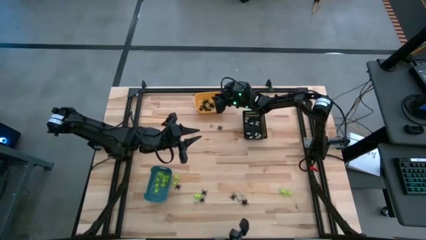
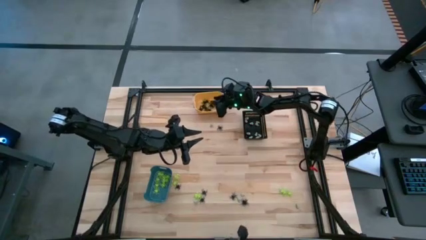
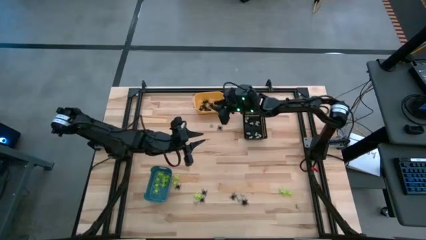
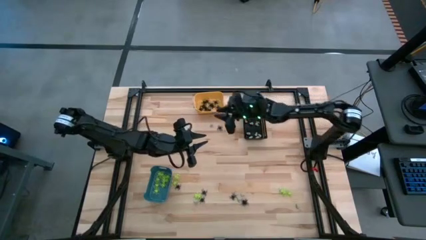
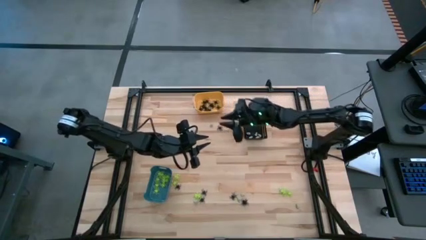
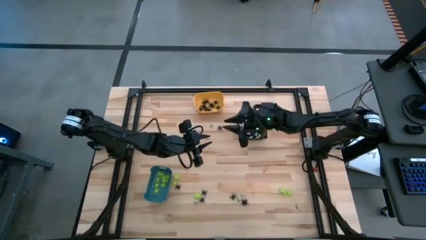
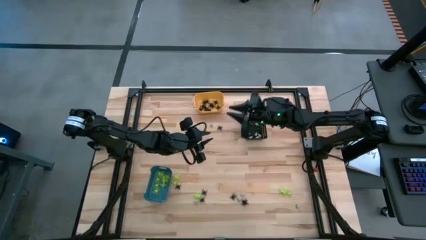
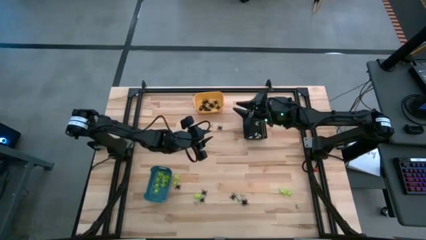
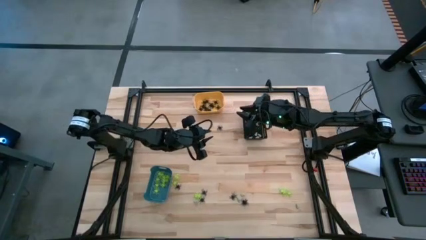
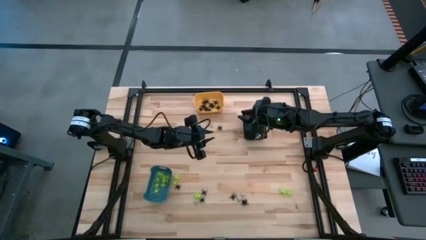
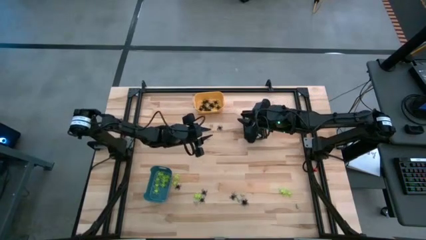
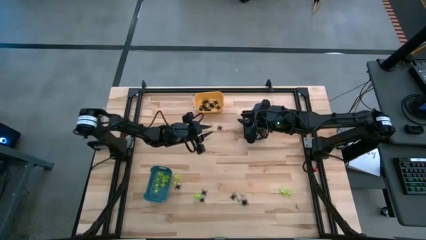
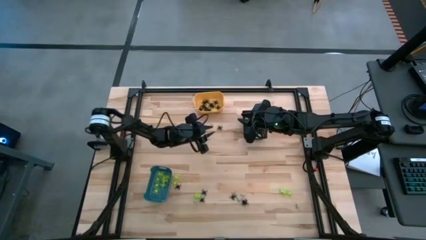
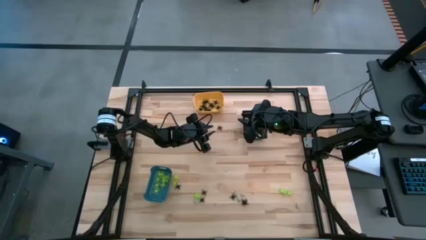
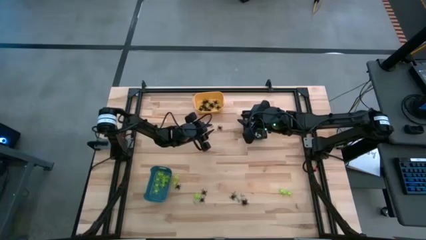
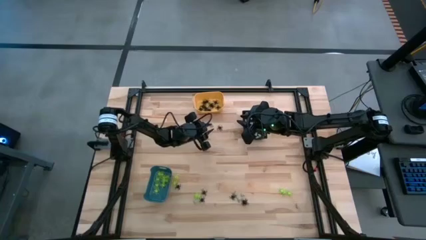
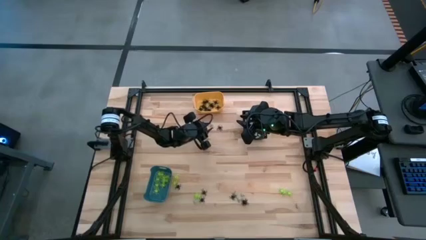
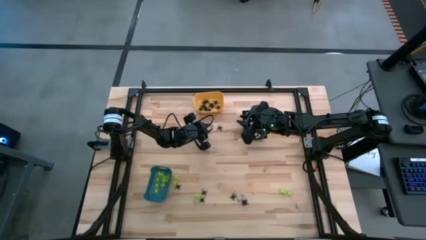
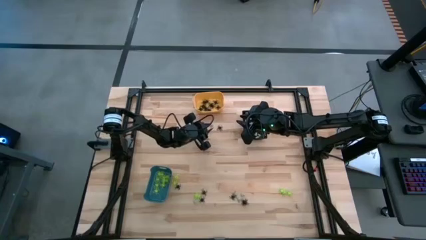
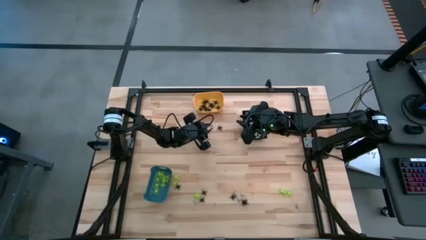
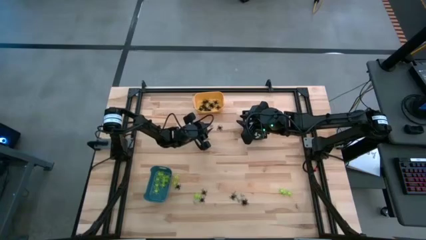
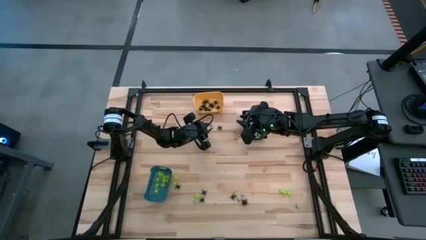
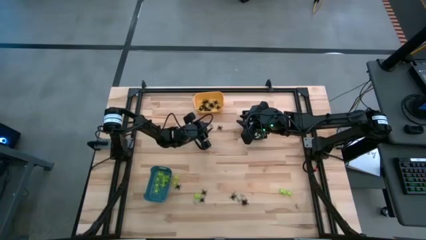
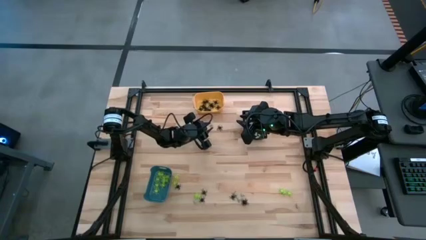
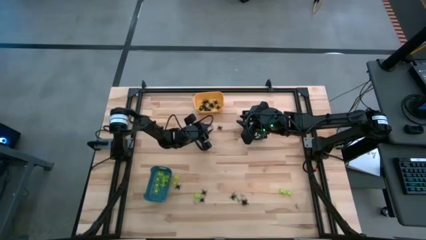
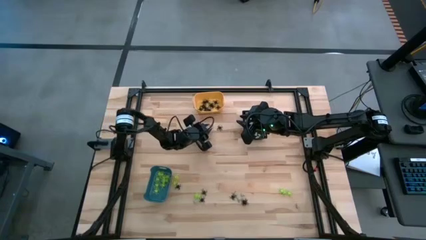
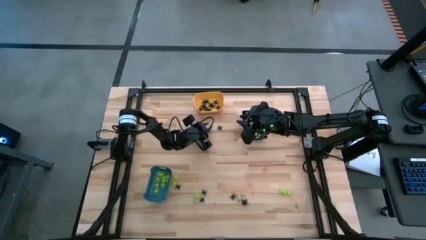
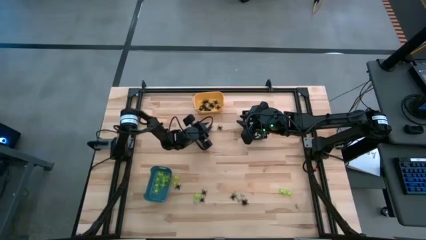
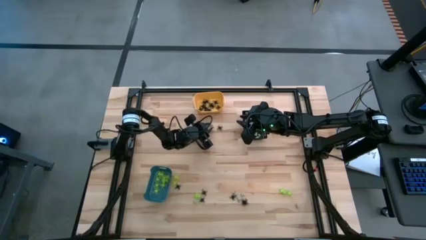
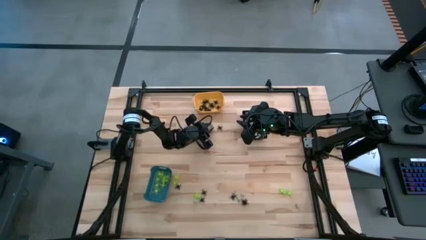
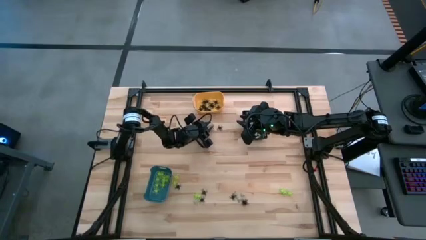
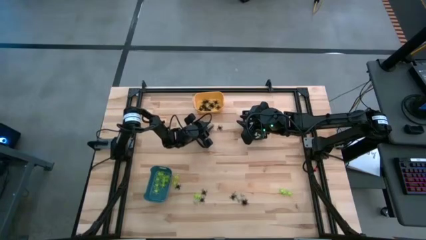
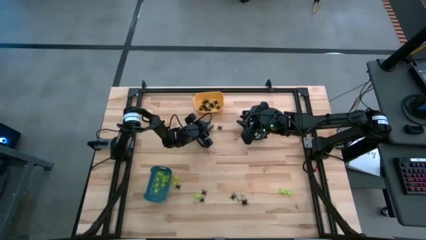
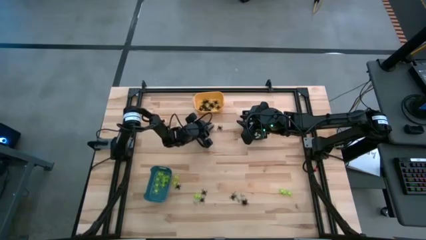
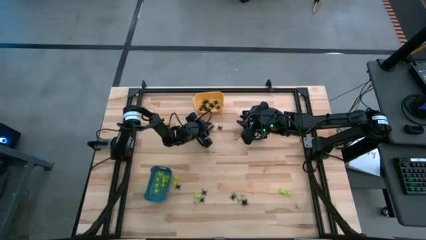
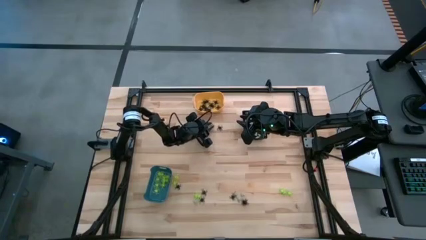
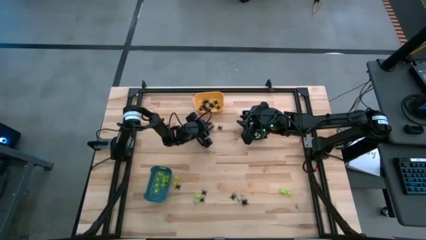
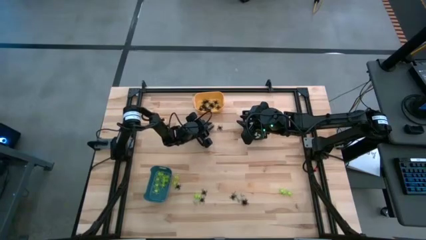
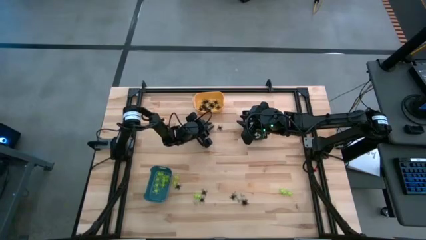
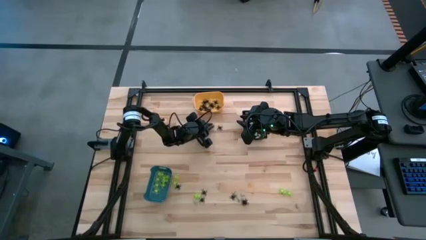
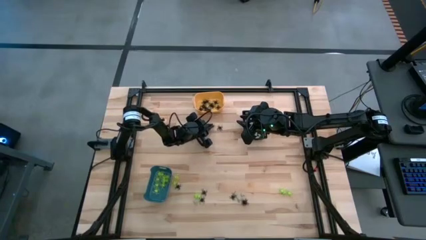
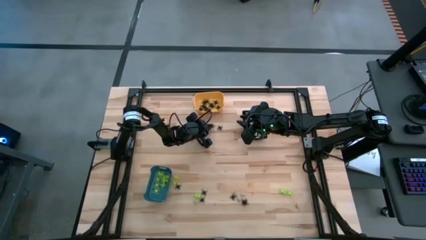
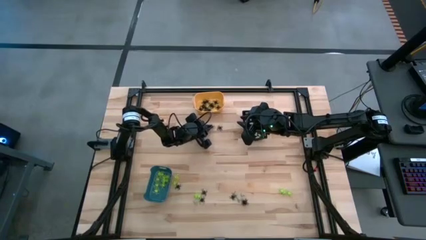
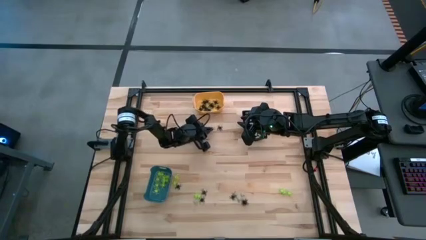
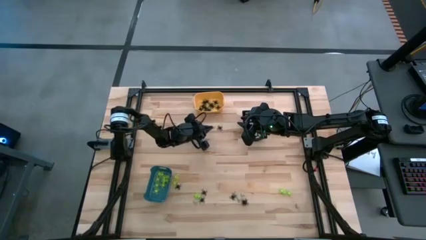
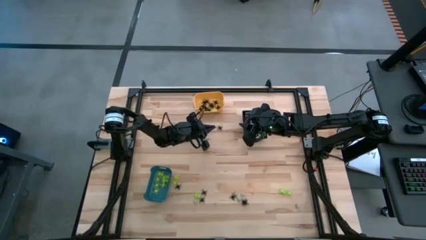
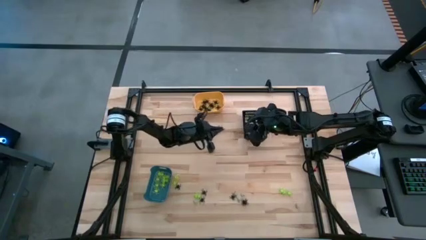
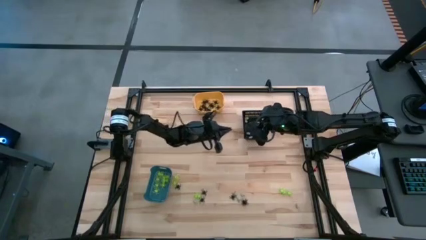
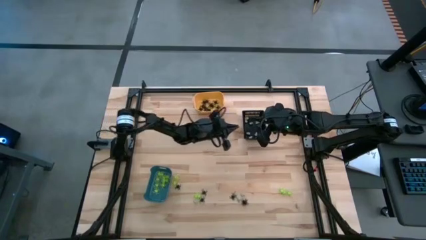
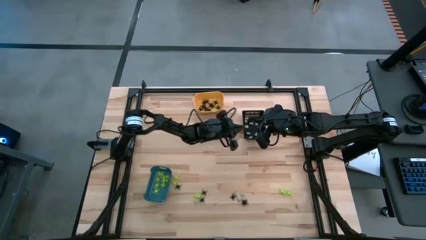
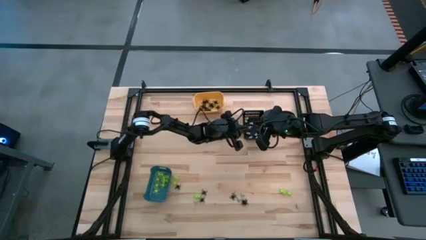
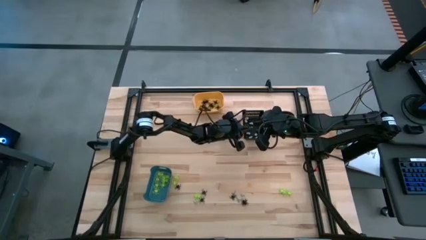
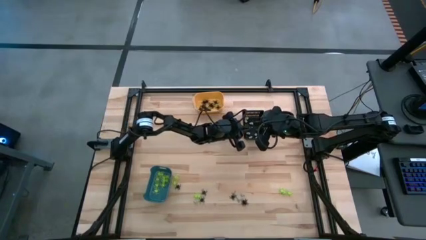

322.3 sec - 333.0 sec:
Task: Sort Halloween decoration
Put the white skull toy into the black bin

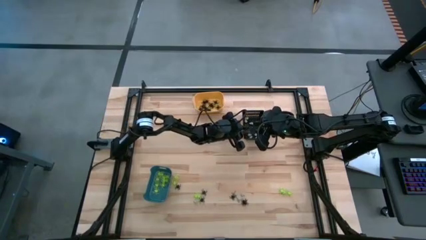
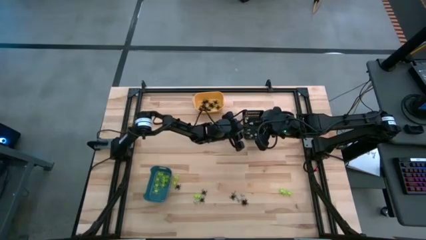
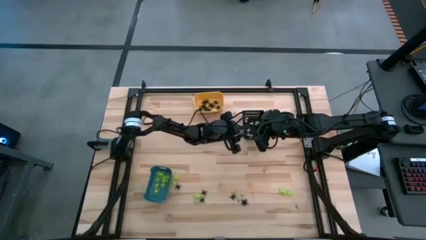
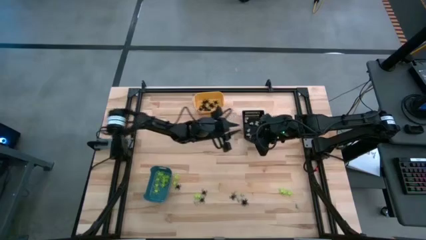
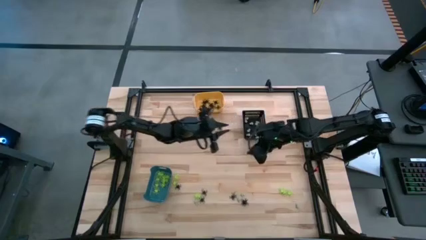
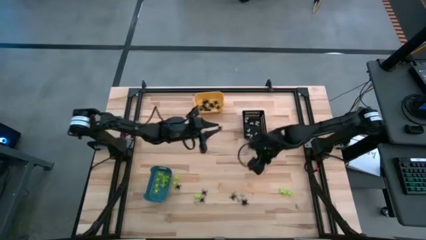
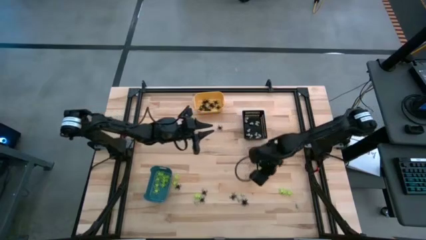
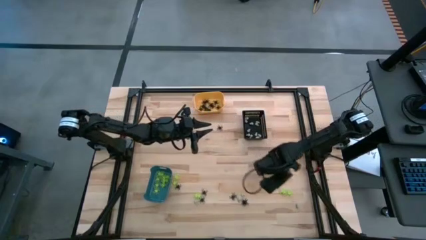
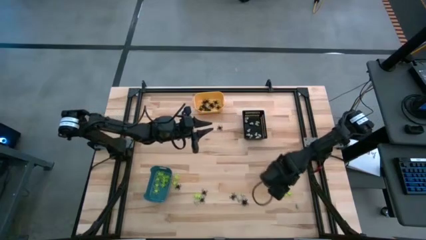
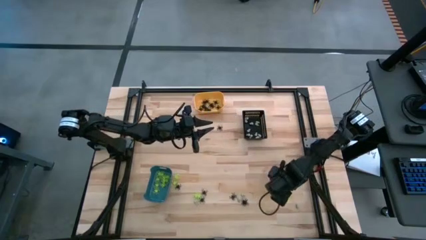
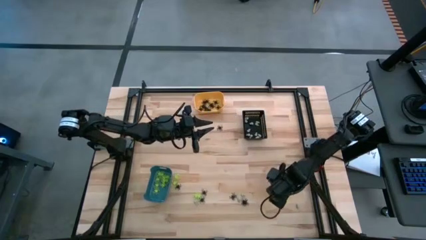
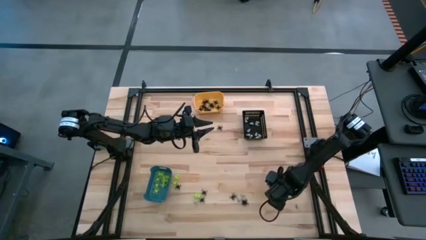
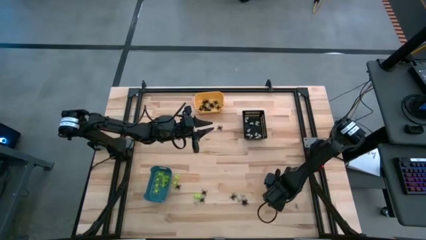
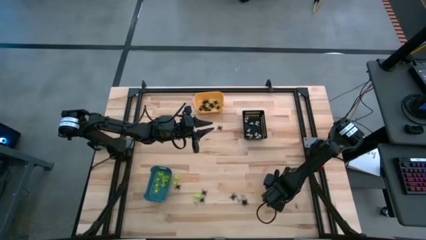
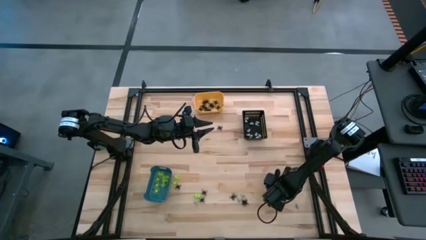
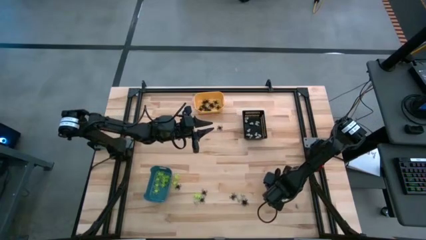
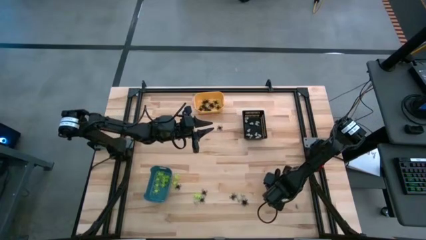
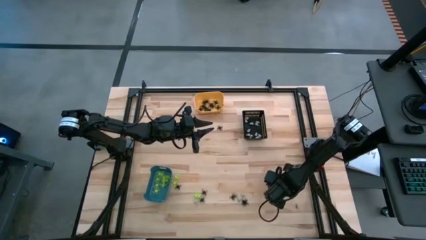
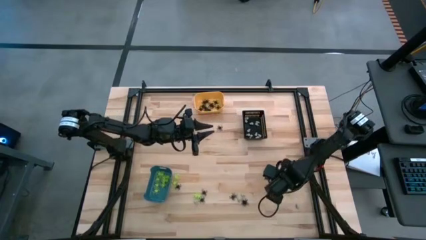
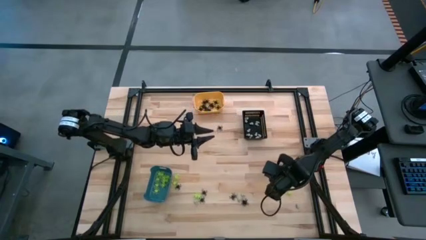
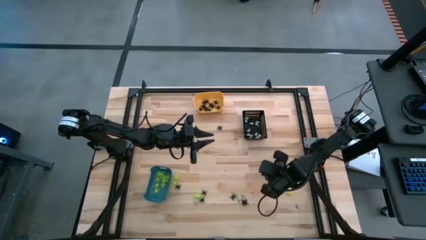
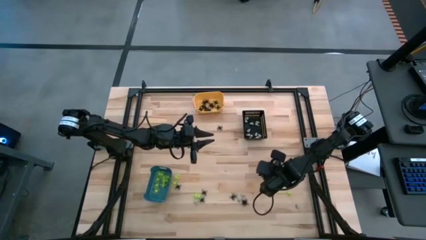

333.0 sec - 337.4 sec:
Put the green spider toy into the blue bin

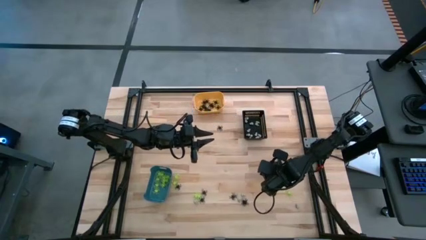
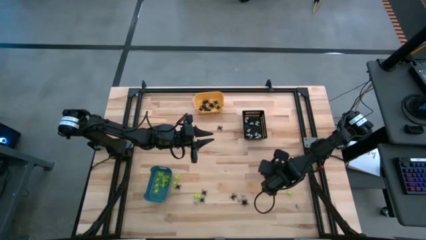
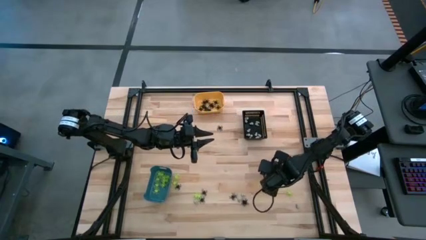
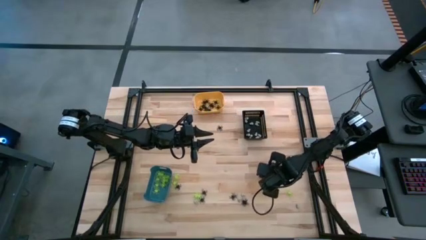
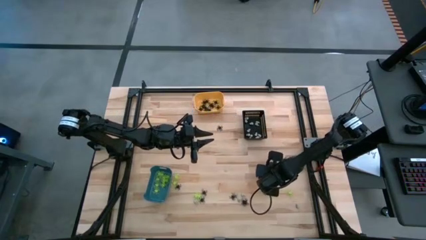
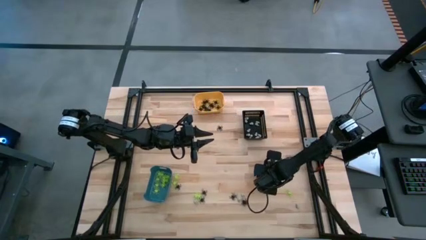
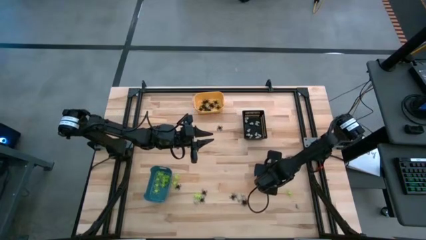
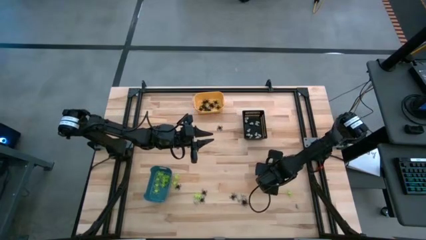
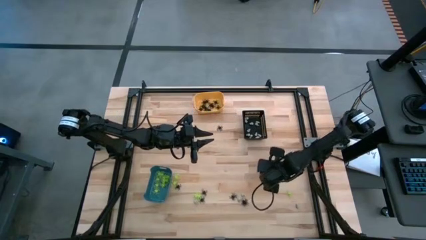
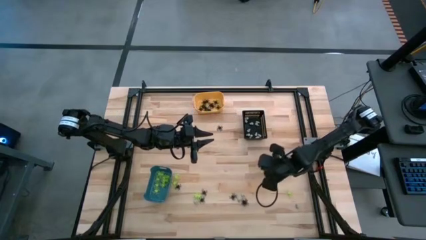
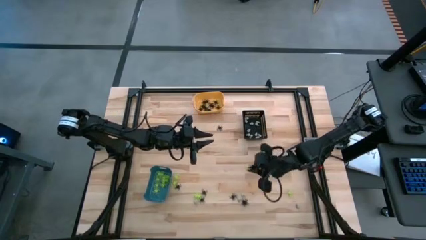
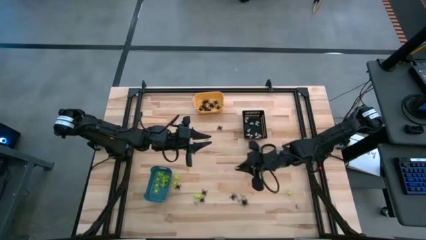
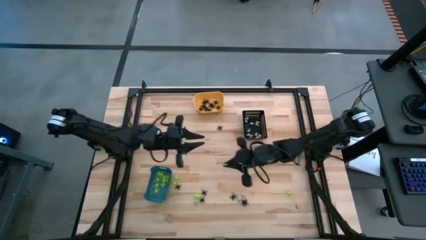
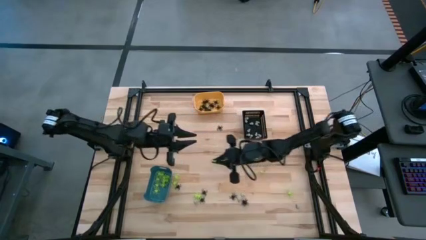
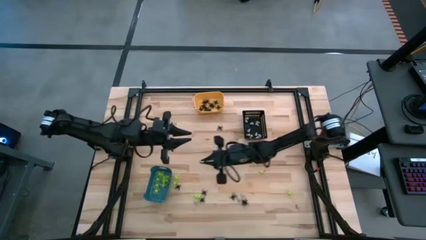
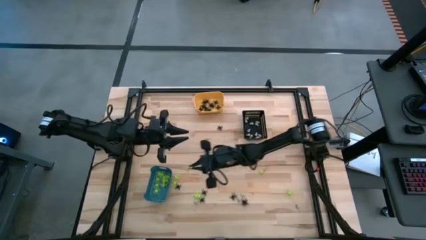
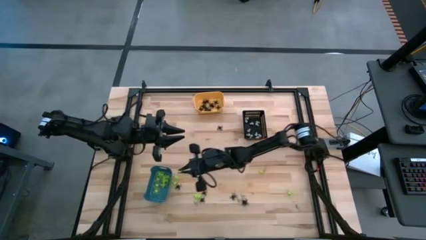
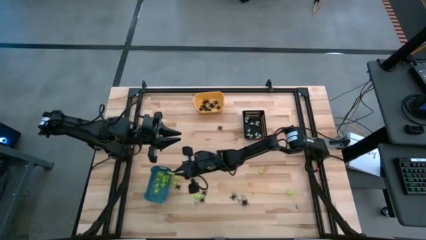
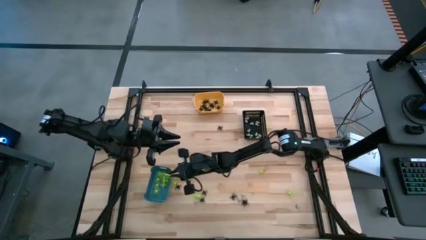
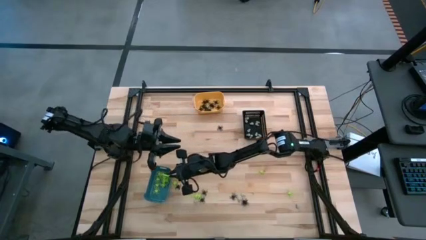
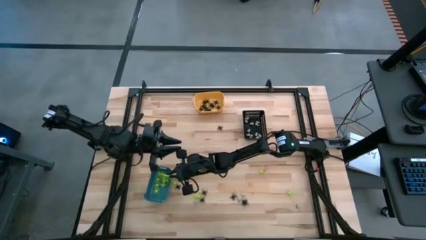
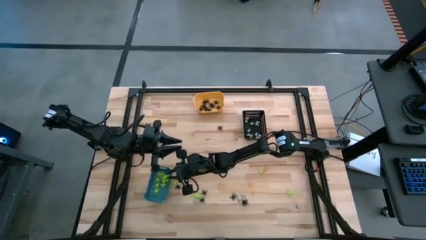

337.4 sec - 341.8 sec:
Put the green spider toy into the blue bin
